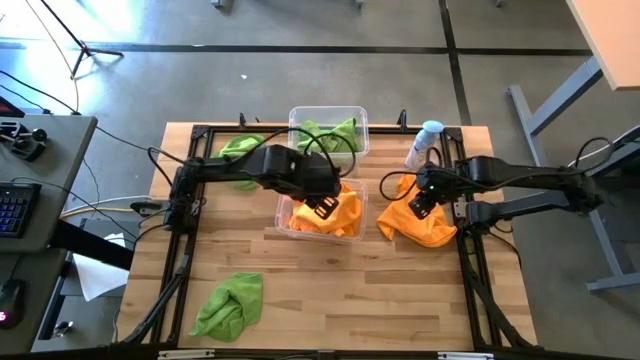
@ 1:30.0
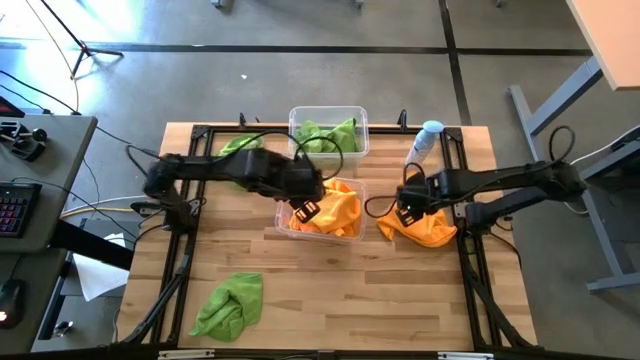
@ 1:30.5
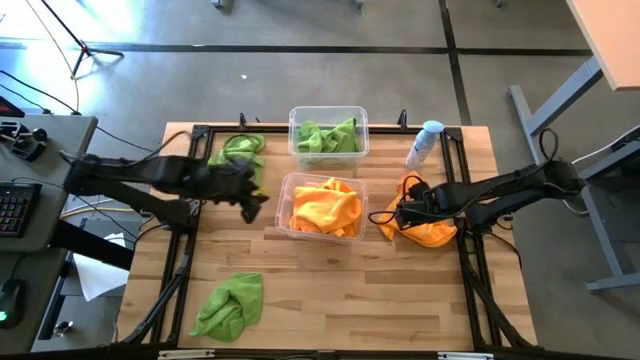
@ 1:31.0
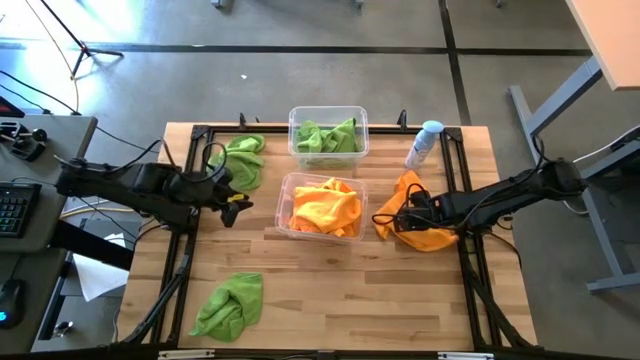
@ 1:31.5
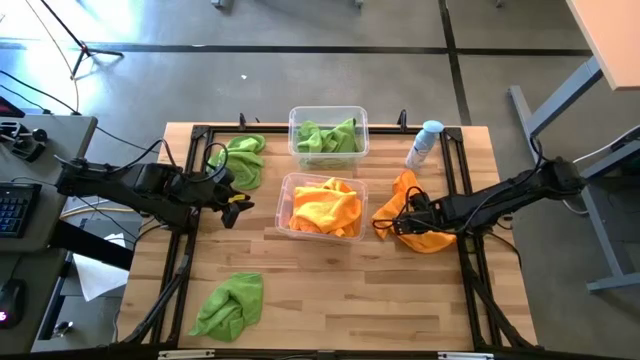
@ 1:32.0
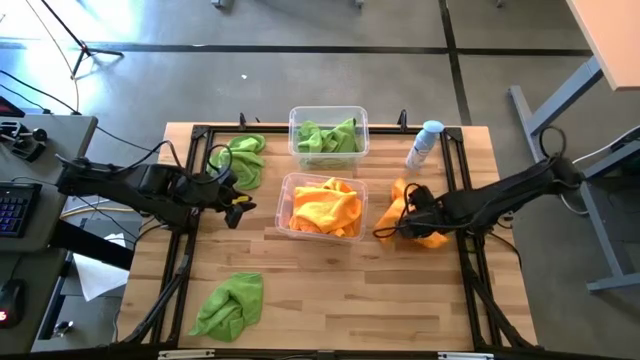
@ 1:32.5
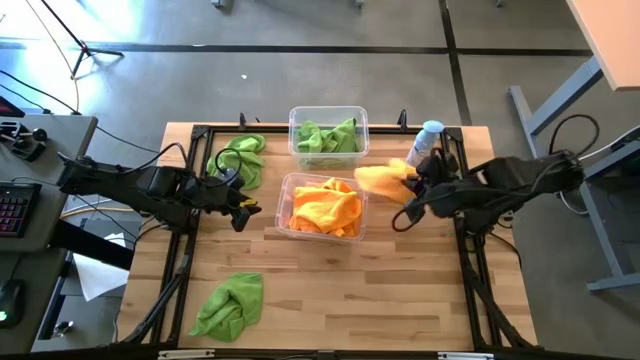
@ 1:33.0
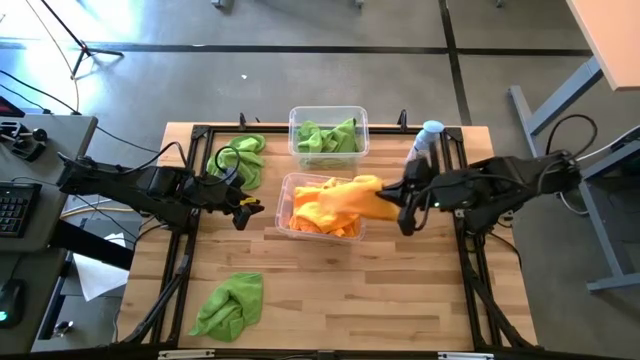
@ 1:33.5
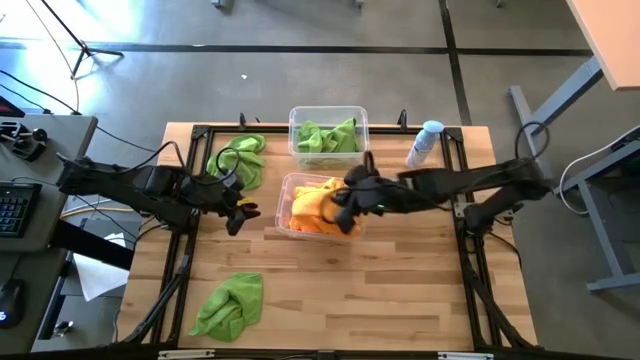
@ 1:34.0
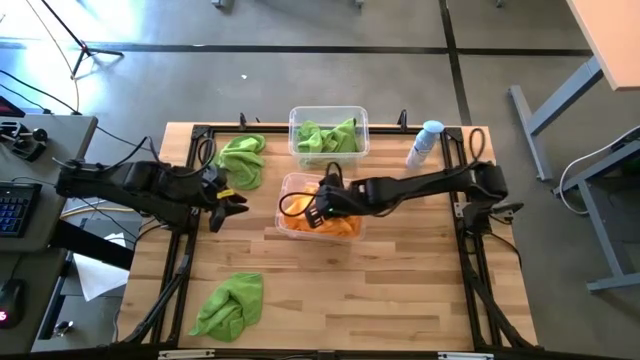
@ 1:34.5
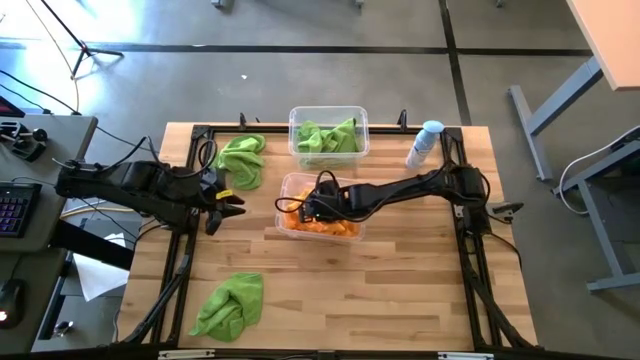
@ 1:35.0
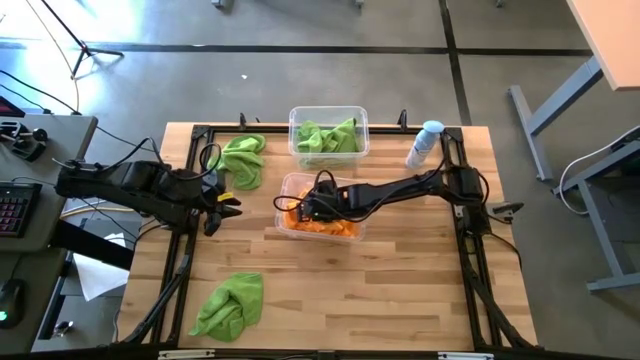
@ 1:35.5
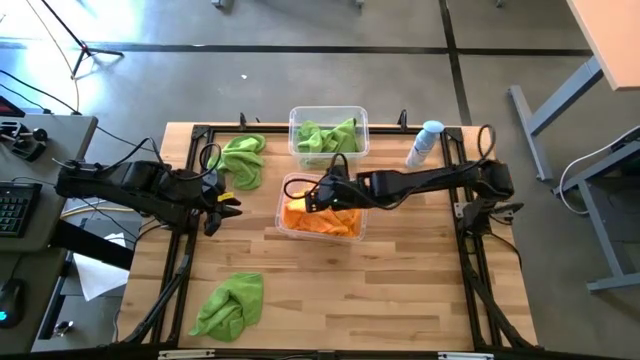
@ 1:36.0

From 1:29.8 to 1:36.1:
Task: Sort microfiber towel by color & place in baskets
Put the orange microfiber towel into the bottom transparent bin

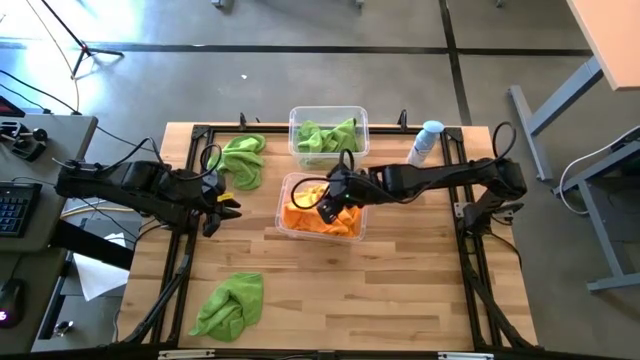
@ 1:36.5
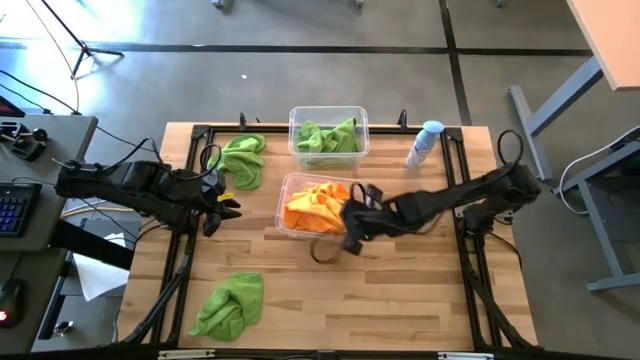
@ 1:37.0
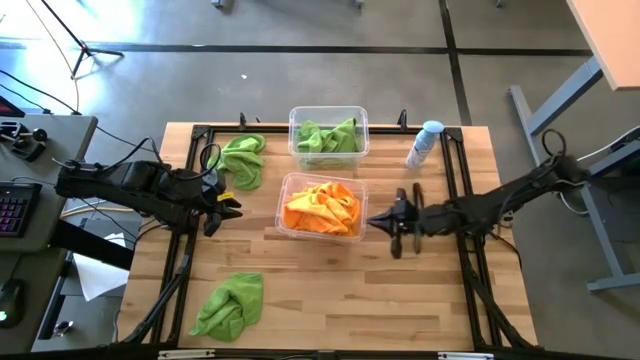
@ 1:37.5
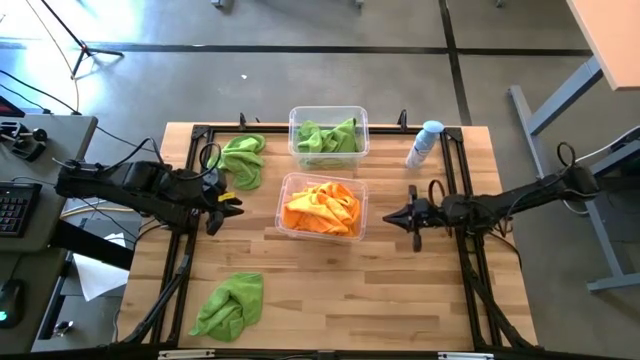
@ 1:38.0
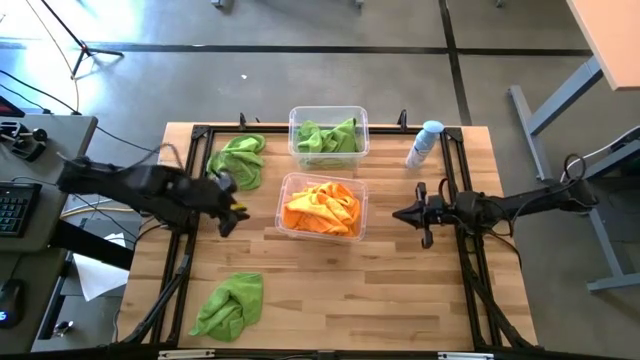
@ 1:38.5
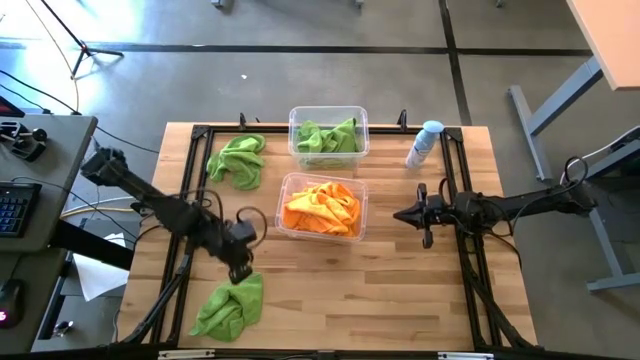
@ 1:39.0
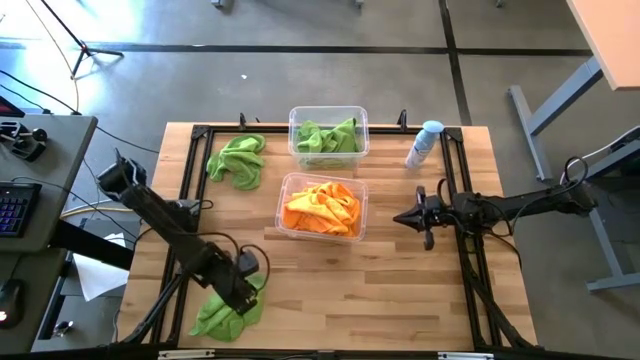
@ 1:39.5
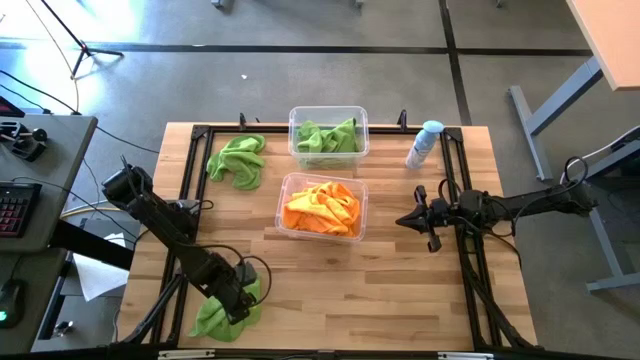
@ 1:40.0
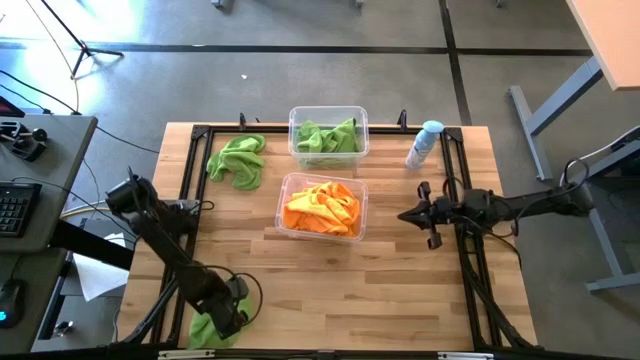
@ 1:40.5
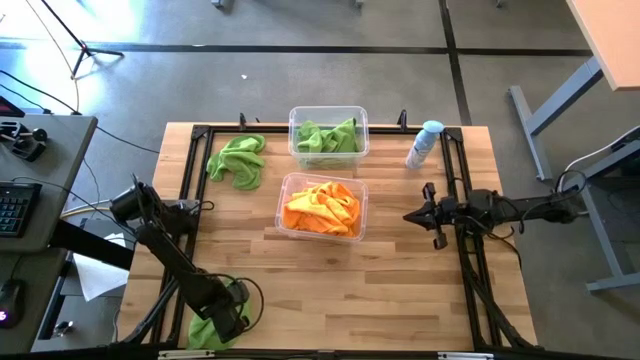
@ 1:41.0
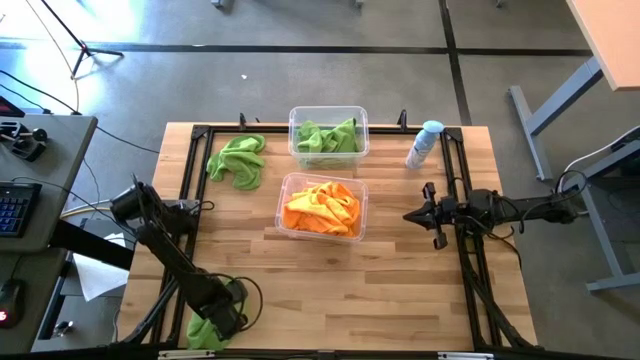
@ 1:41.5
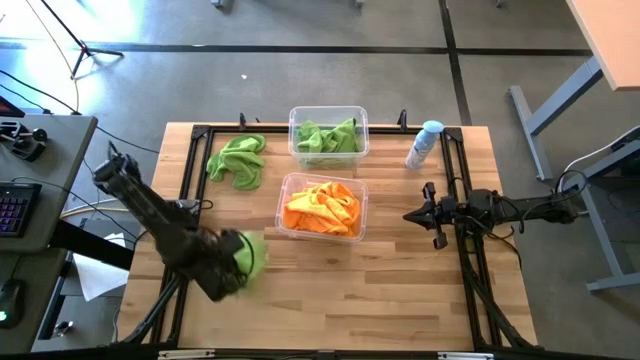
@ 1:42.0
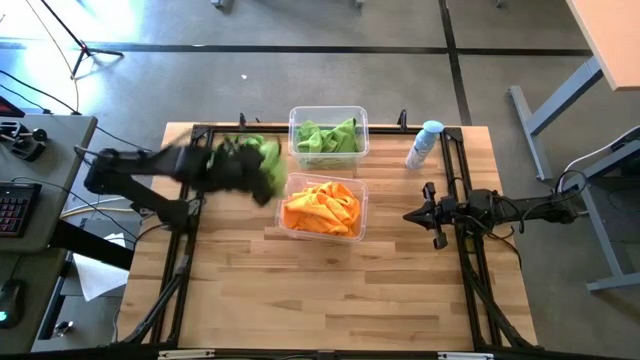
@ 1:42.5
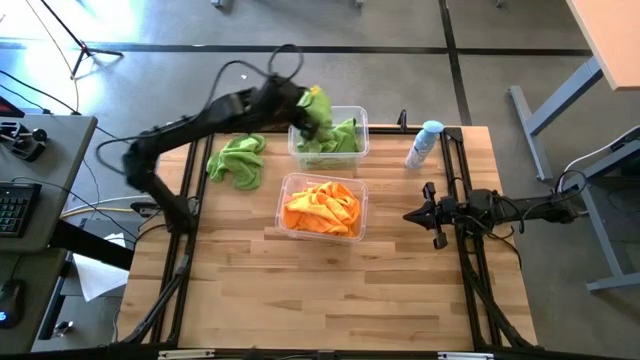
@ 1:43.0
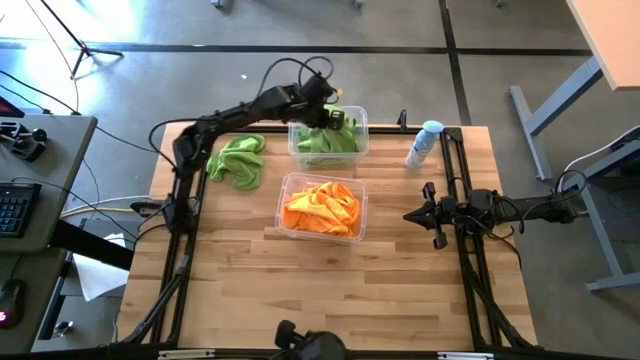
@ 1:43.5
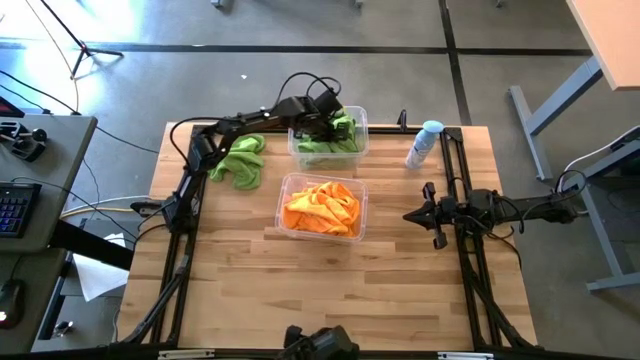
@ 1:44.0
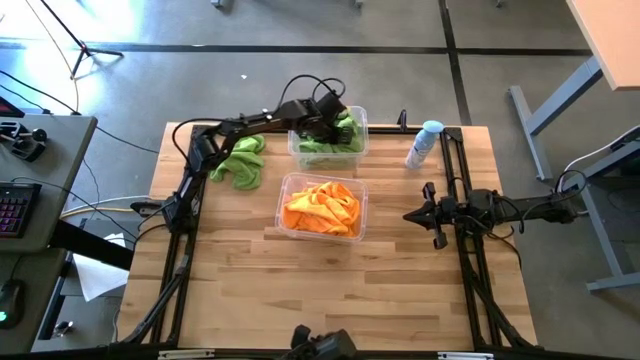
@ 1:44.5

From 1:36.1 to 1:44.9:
Put the green microfiber towel into the top transparent bin

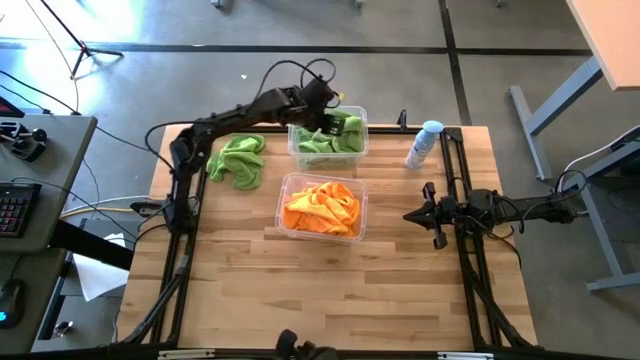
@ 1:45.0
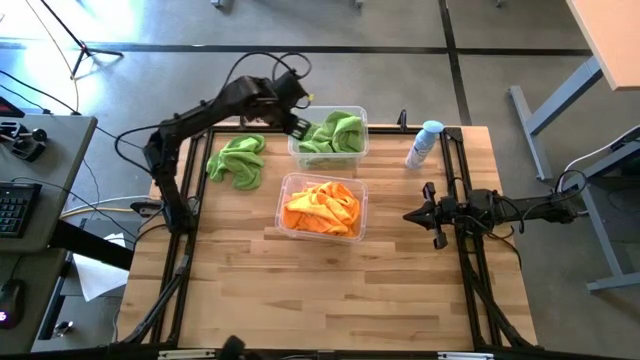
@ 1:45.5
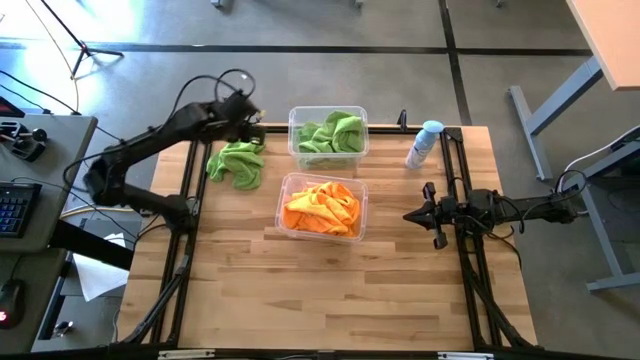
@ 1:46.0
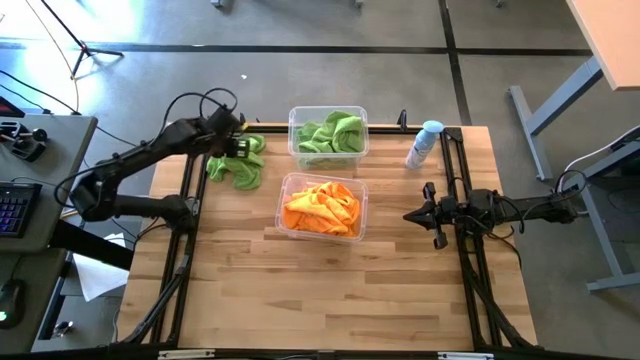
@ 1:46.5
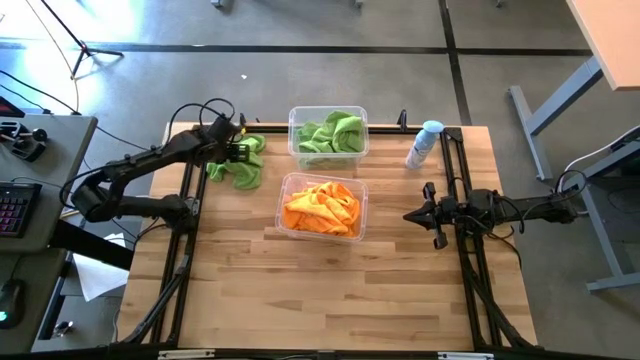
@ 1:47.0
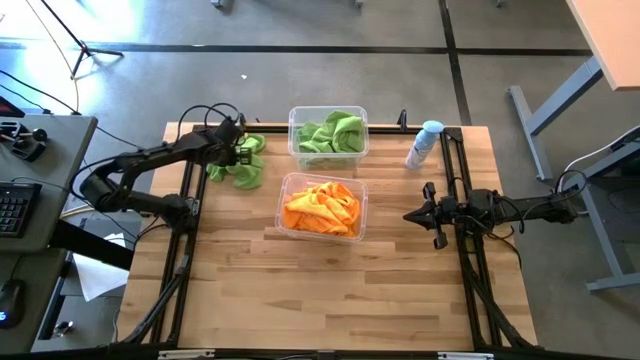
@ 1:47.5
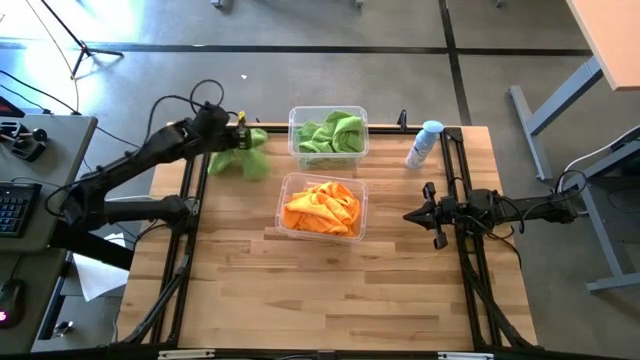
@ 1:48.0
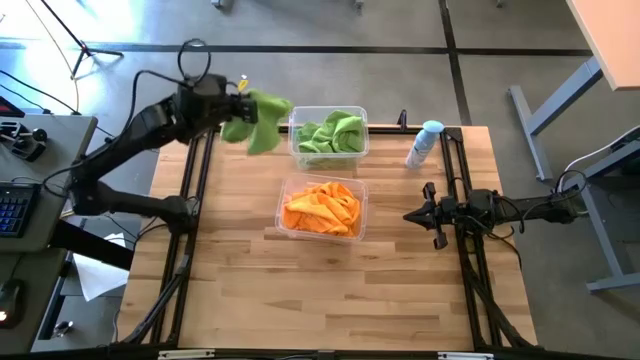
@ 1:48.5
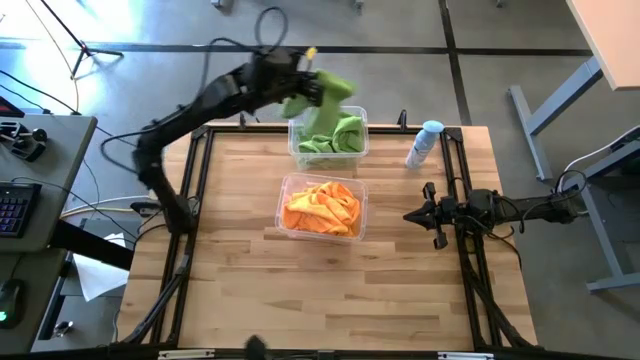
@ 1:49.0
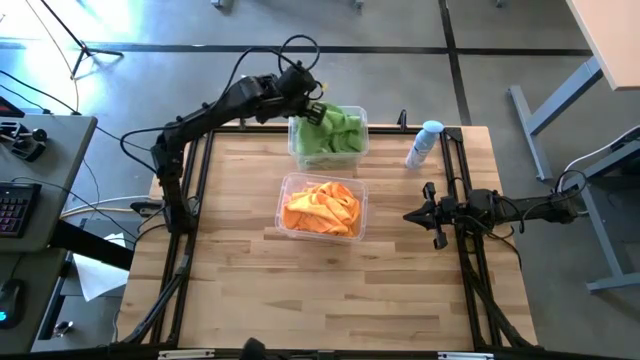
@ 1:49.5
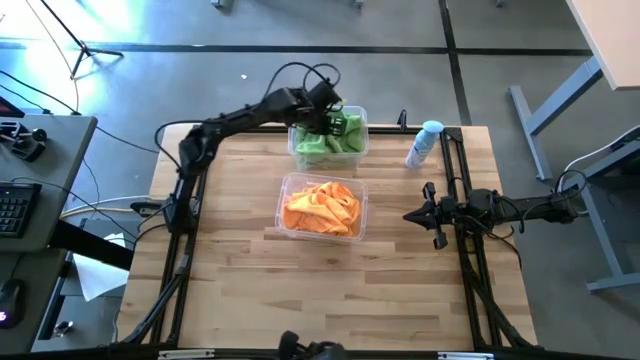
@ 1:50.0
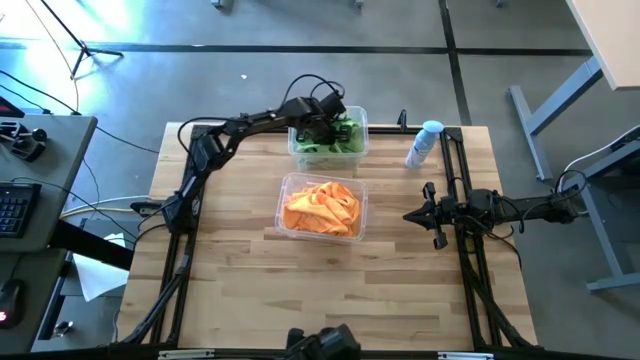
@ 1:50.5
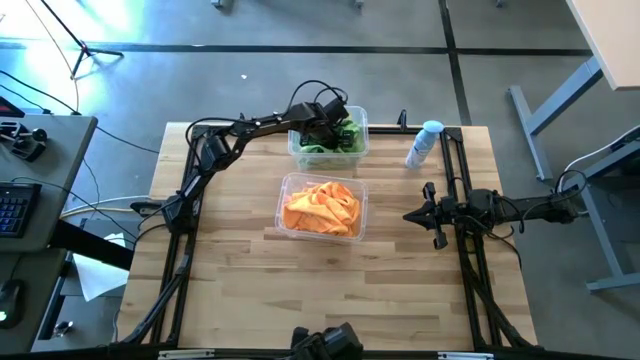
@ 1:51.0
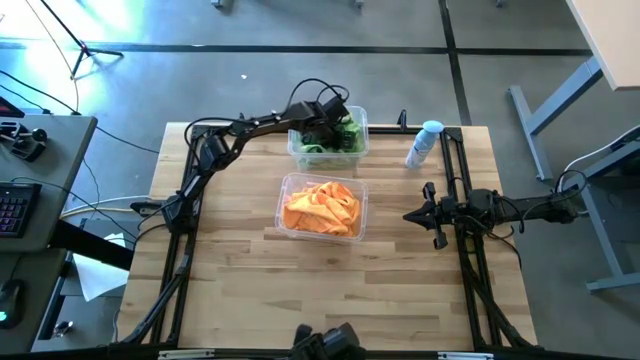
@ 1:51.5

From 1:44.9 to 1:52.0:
Put the green microfiber towel into the top transparent bin
